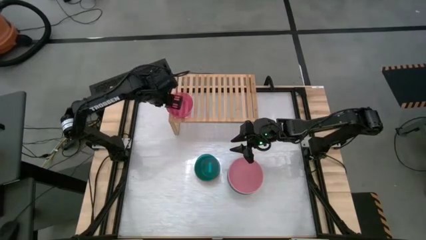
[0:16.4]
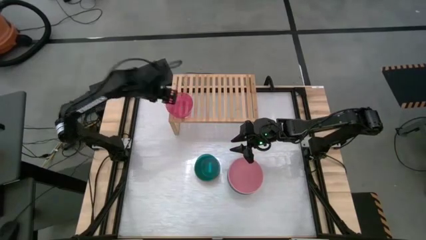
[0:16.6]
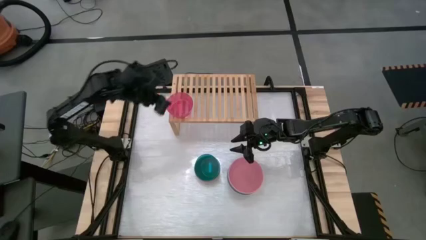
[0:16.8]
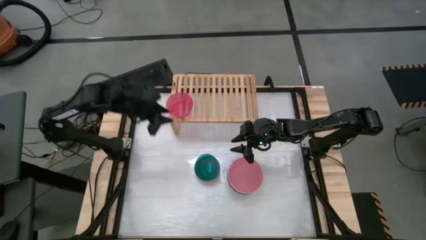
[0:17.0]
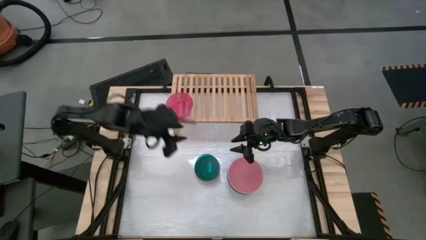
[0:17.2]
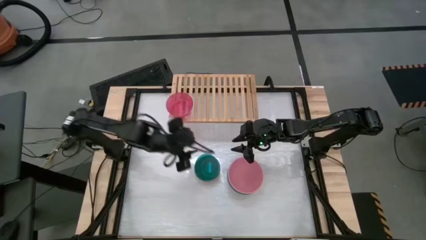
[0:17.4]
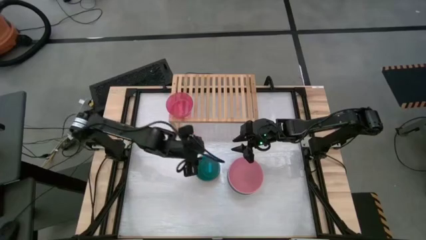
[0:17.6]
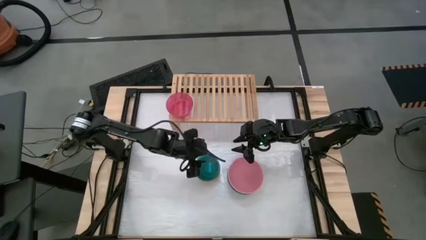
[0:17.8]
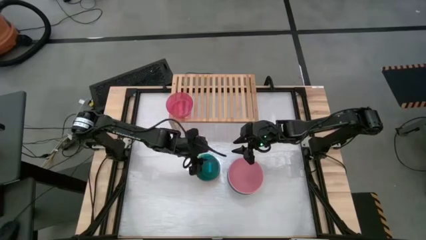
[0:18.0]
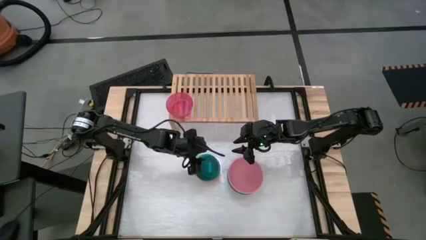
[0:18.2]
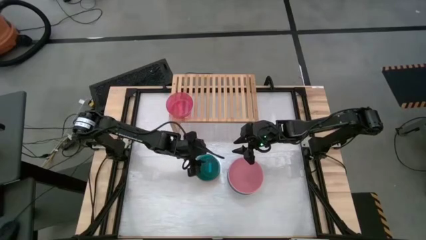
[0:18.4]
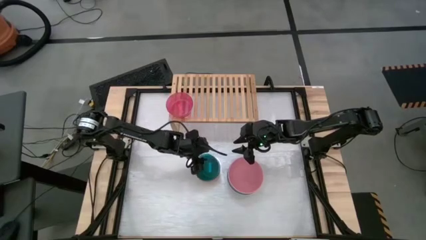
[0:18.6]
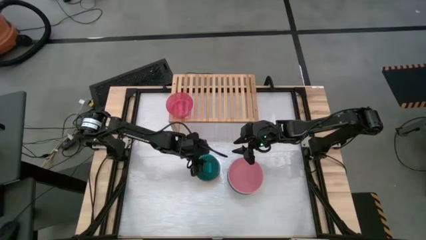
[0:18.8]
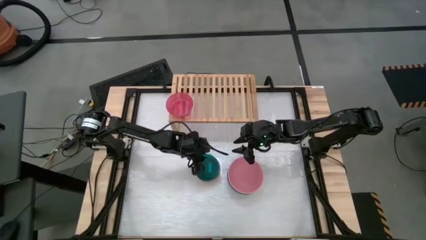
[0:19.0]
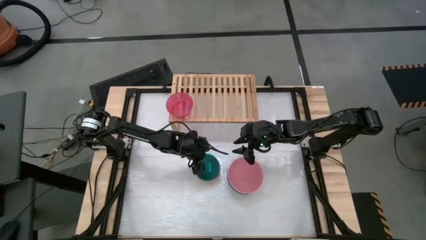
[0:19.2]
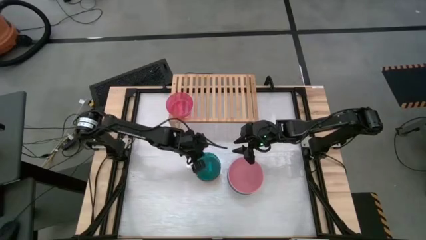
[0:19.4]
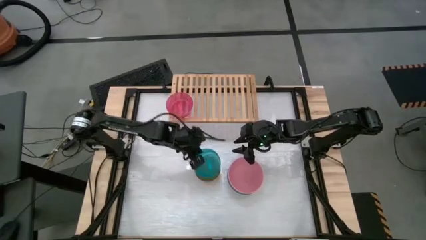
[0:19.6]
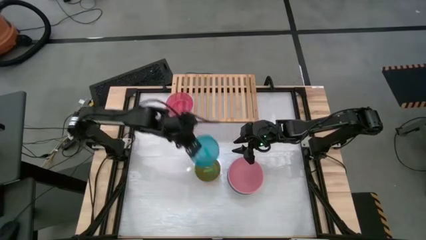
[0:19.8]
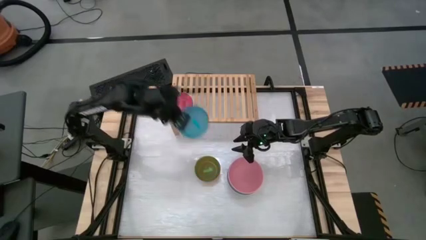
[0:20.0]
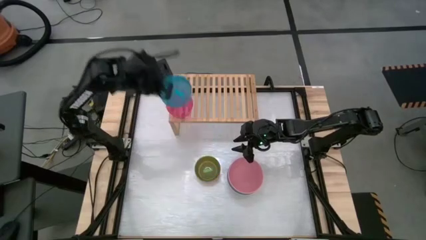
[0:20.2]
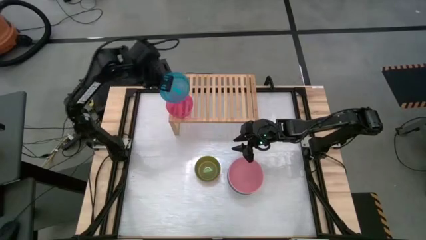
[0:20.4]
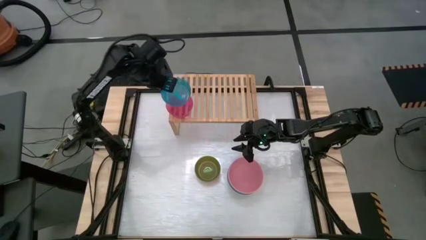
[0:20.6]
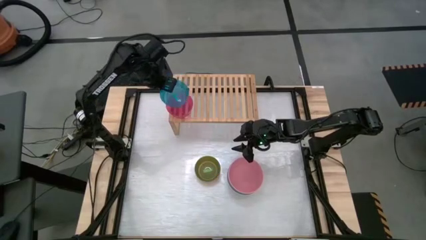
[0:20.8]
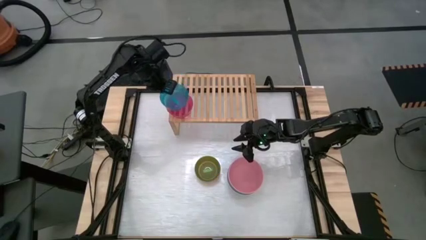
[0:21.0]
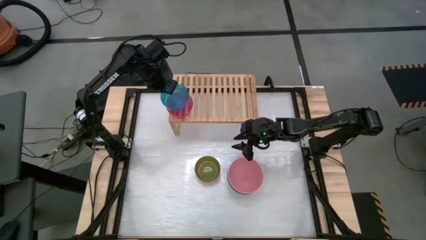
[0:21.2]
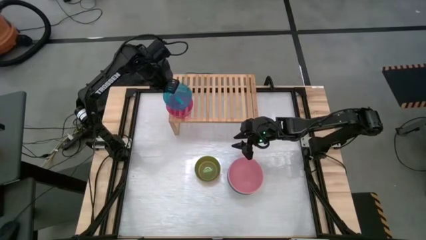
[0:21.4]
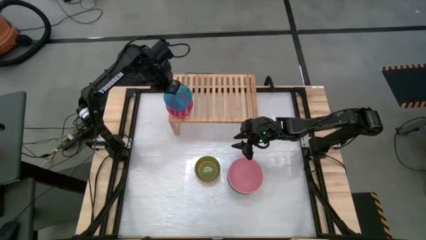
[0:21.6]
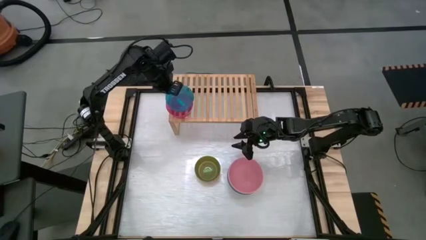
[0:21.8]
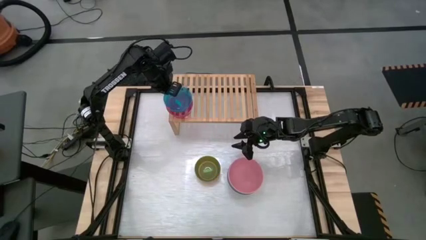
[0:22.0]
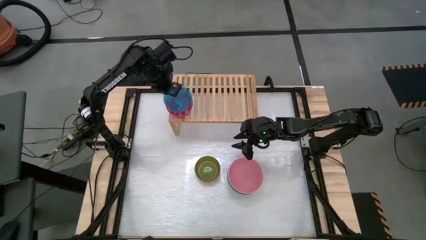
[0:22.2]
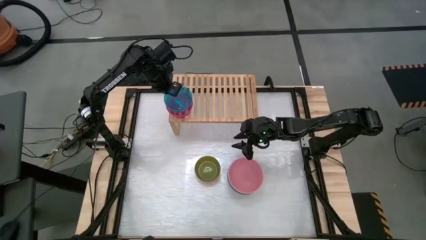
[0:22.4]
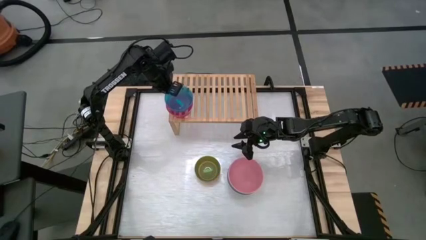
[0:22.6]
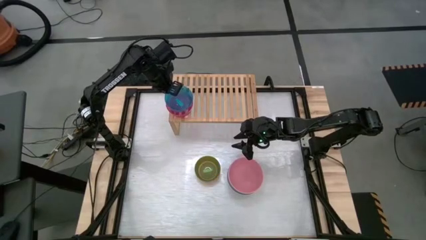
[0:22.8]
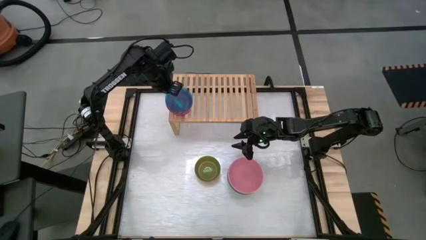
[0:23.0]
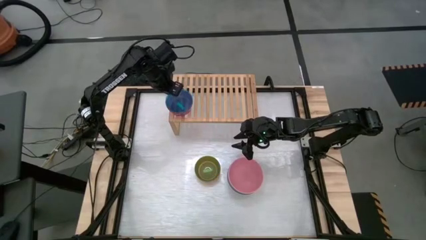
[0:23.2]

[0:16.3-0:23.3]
Task: Place and stack bowls onto a shelf
Stack the blue bowl on top of the pink bowl on the shelf

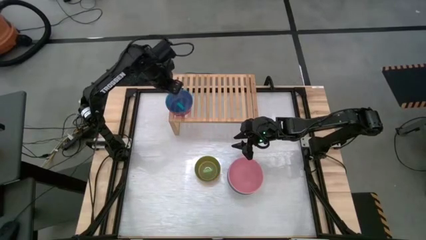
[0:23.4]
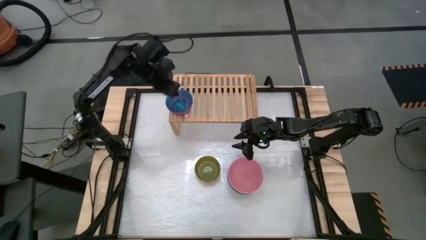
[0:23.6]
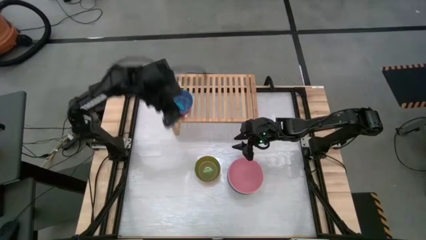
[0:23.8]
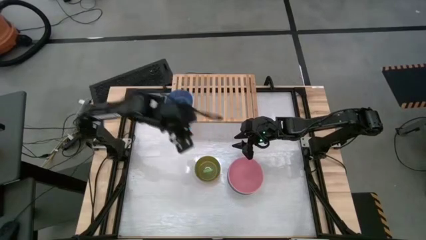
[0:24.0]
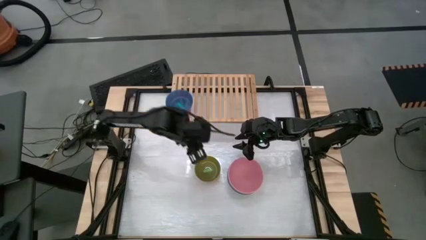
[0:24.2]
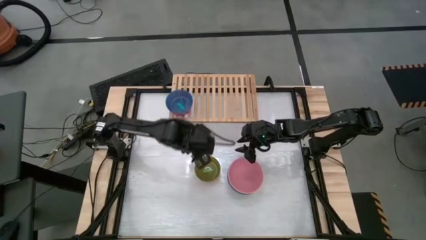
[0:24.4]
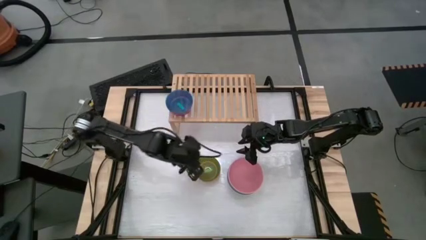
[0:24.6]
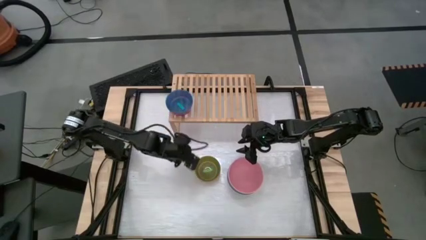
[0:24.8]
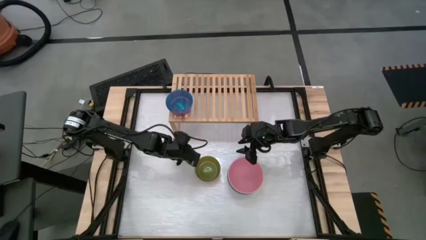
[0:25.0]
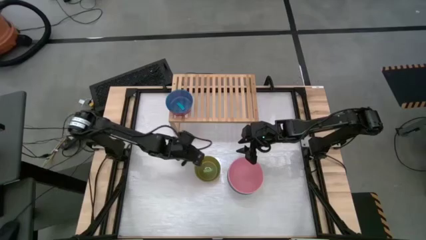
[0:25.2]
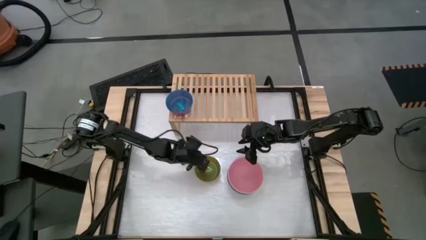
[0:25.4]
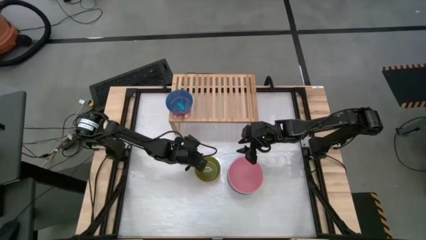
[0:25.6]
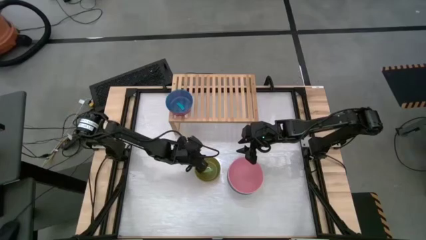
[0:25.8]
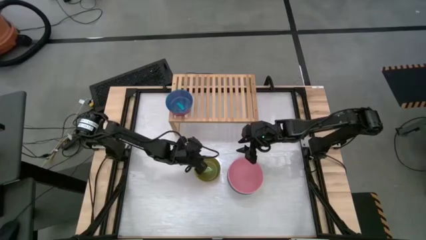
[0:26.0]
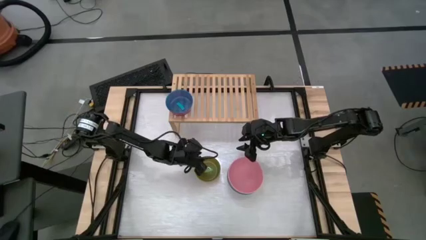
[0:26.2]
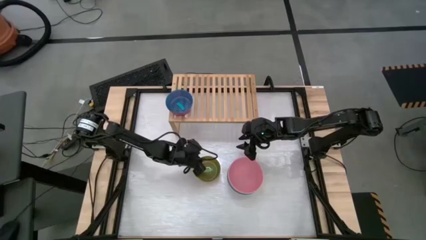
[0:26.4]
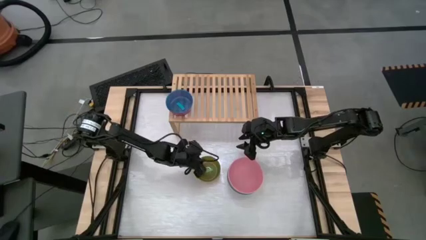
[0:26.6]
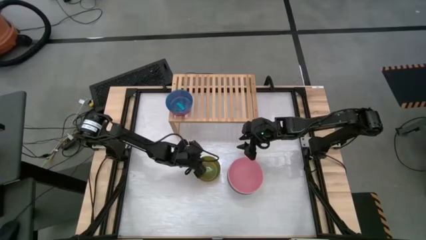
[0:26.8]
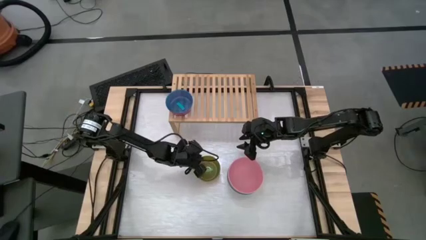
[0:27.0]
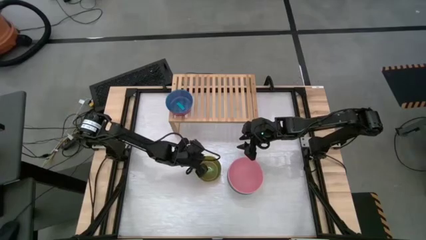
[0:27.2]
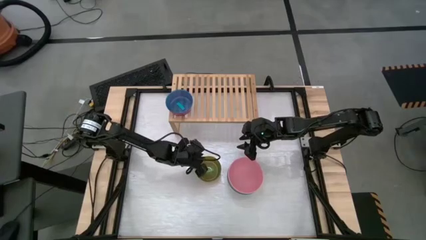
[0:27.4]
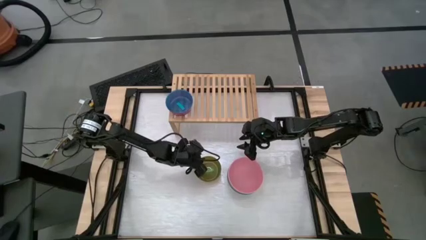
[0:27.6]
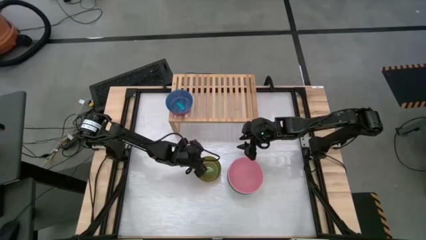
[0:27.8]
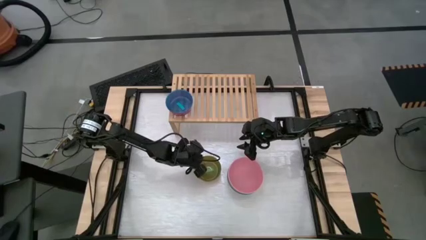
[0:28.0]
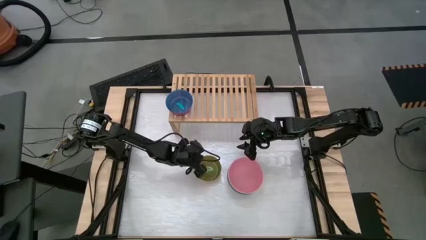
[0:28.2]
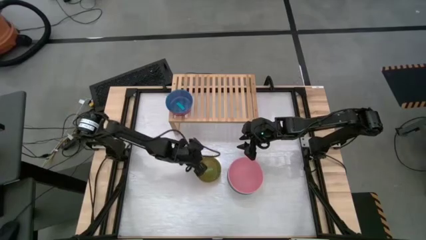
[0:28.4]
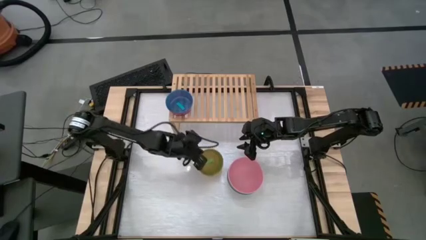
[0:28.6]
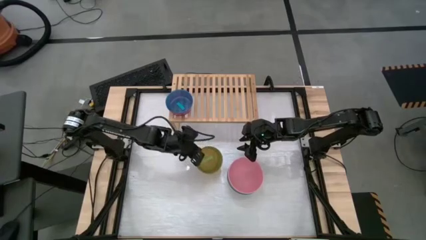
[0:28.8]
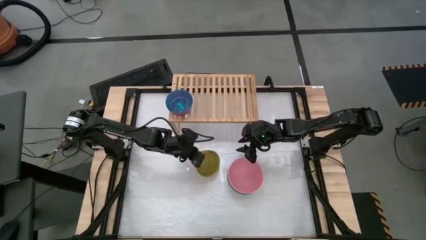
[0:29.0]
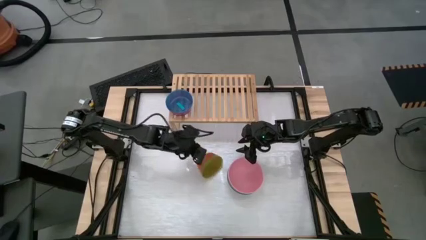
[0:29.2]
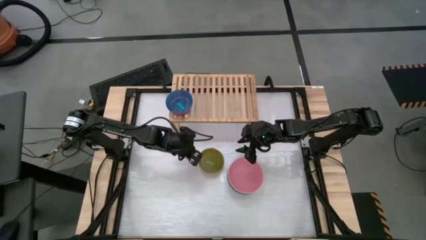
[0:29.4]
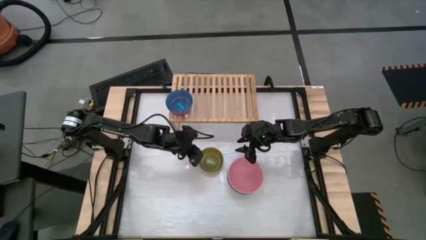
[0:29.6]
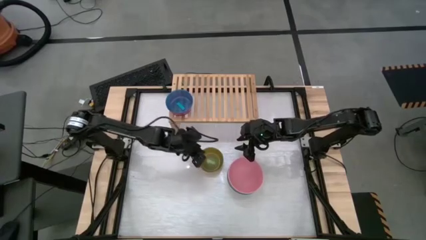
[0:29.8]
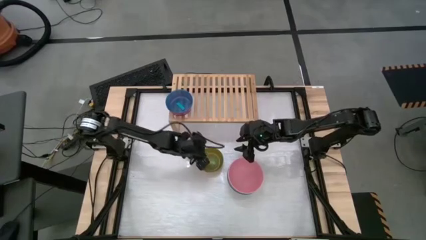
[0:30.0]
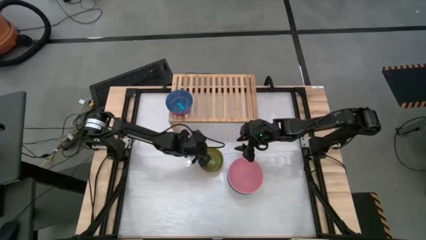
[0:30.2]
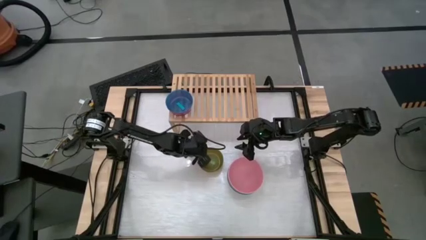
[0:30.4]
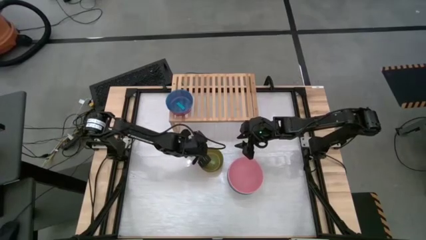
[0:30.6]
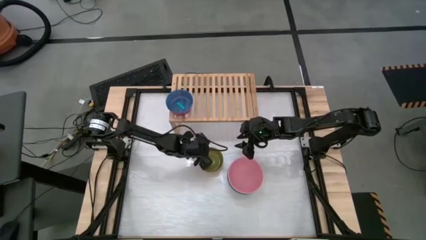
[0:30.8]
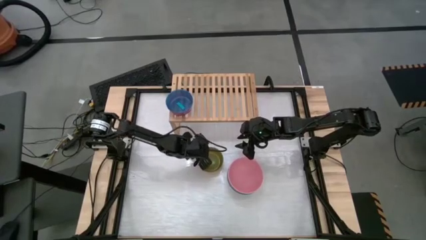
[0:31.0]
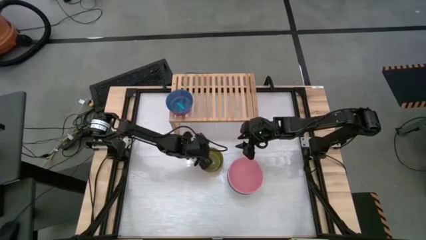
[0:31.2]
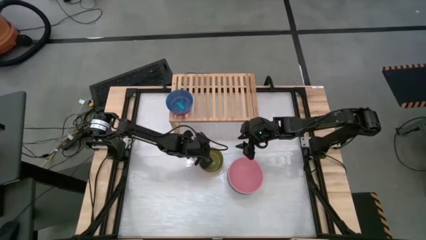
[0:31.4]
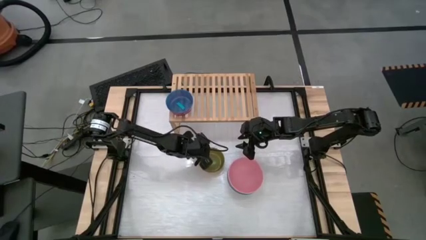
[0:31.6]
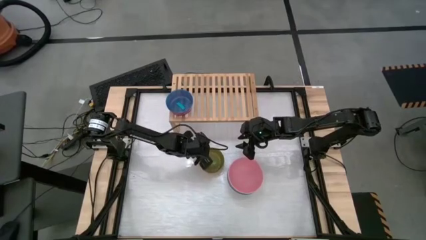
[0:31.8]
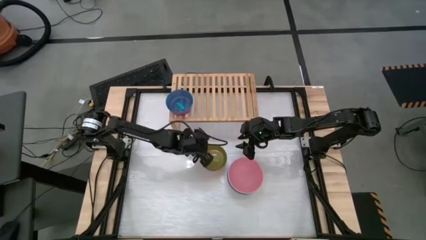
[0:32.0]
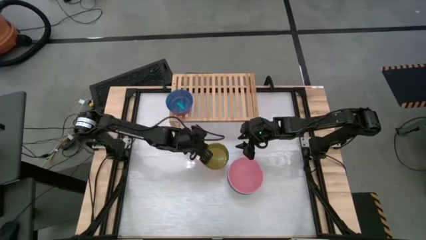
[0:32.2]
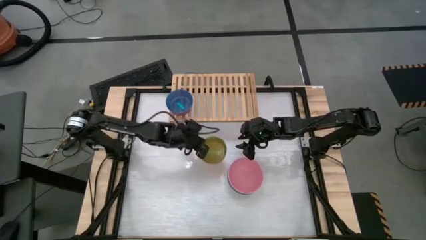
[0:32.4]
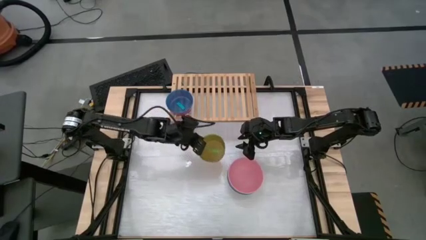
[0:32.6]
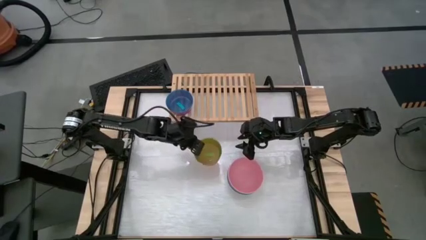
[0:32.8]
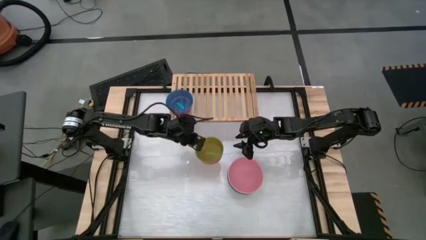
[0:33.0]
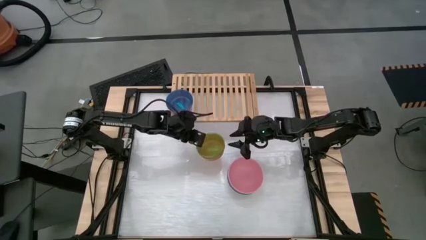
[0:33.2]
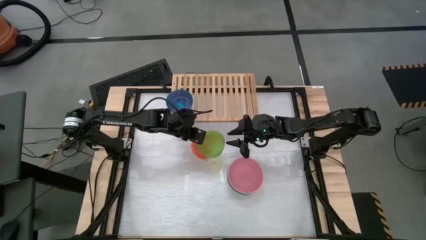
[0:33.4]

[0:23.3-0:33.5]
Stack the green bowl on top of the blue bowl on the shelf

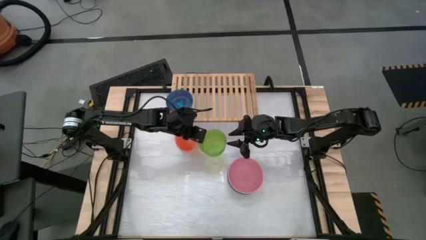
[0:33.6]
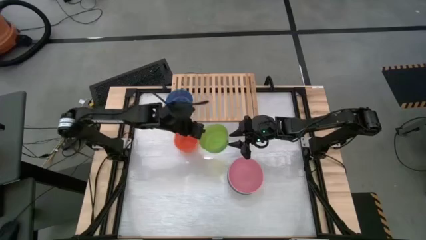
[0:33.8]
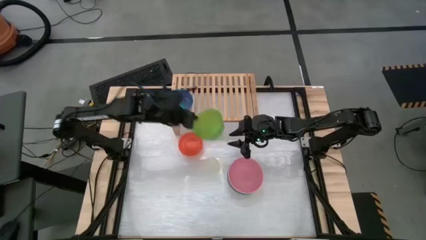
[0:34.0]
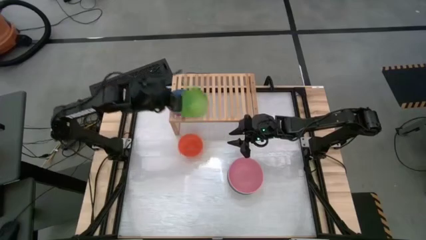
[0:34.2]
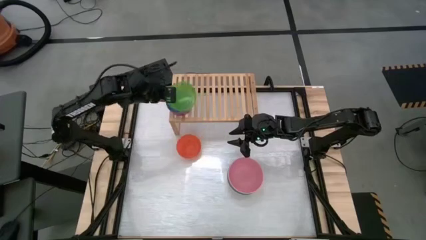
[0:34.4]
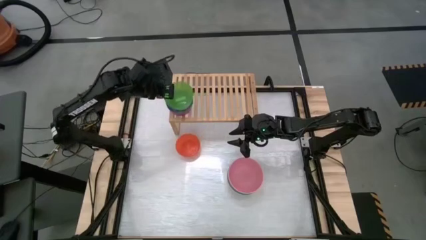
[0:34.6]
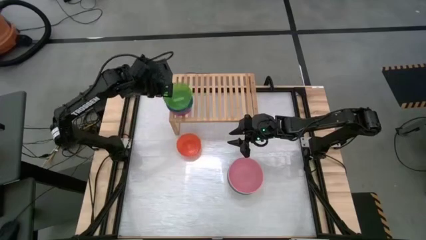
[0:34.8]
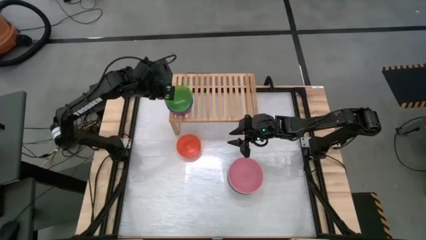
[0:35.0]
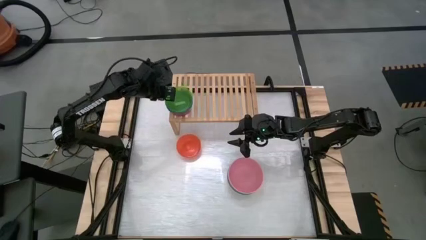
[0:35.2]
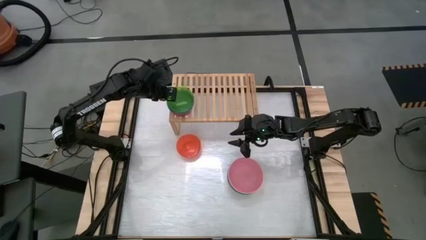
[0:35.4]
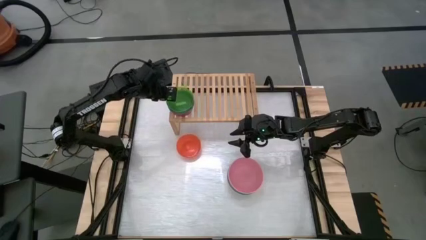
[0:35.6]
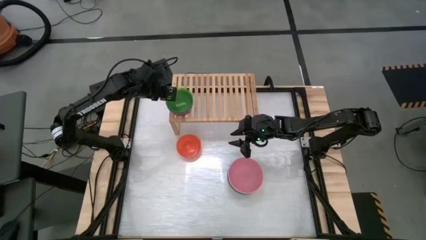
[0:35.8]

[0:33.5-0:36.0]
Stack the green bowl on top of the blue bowl on the shelf
